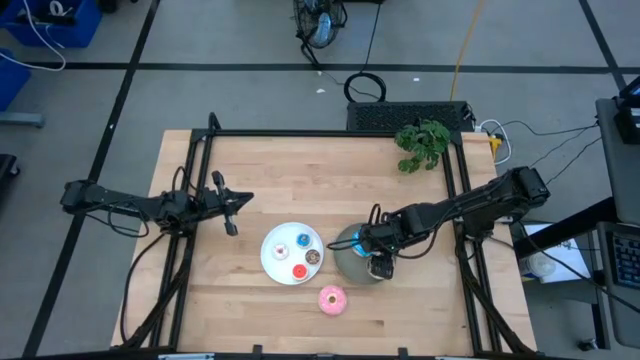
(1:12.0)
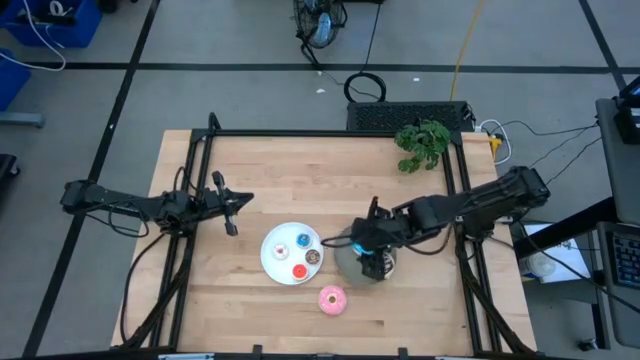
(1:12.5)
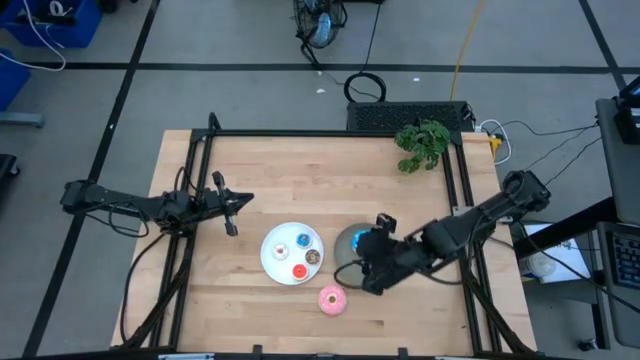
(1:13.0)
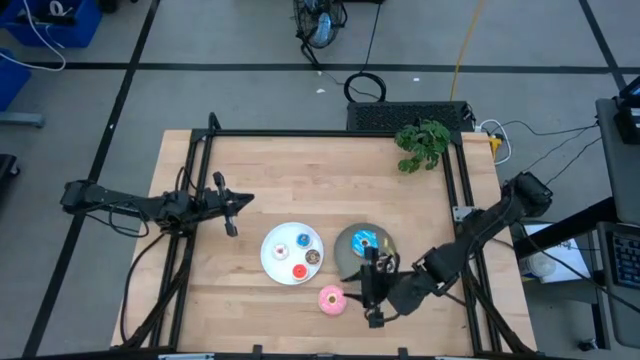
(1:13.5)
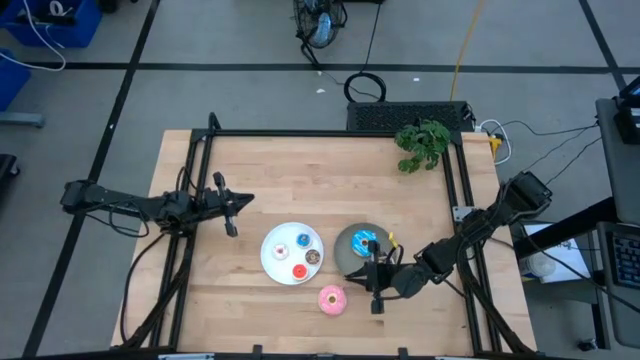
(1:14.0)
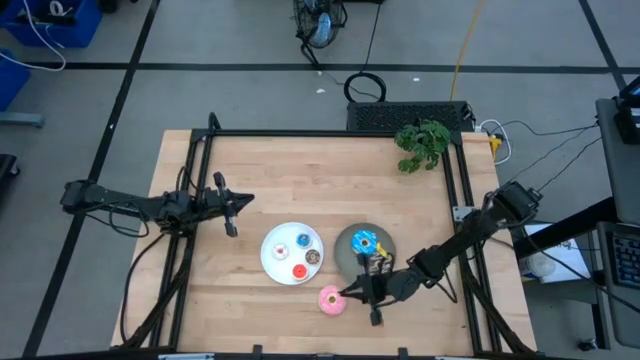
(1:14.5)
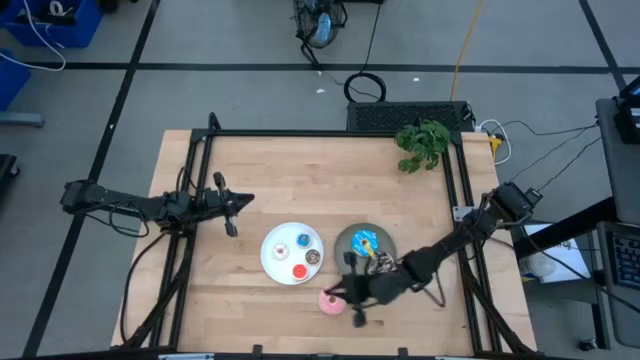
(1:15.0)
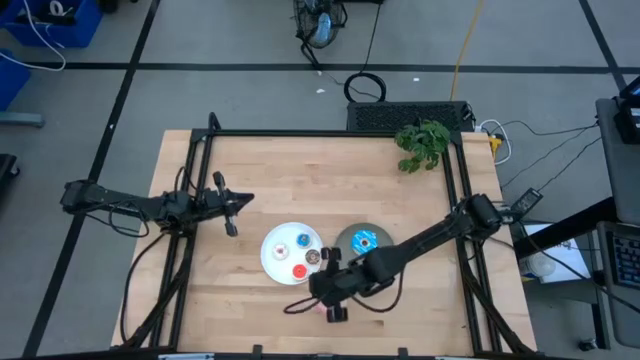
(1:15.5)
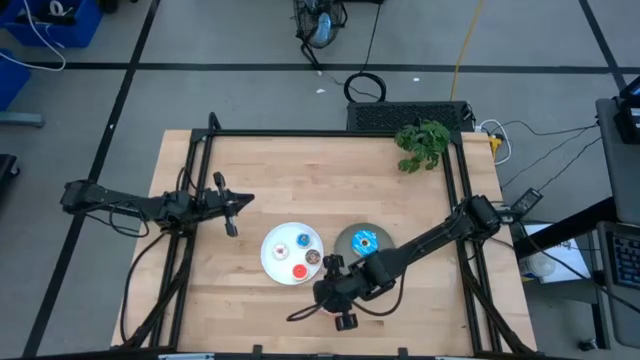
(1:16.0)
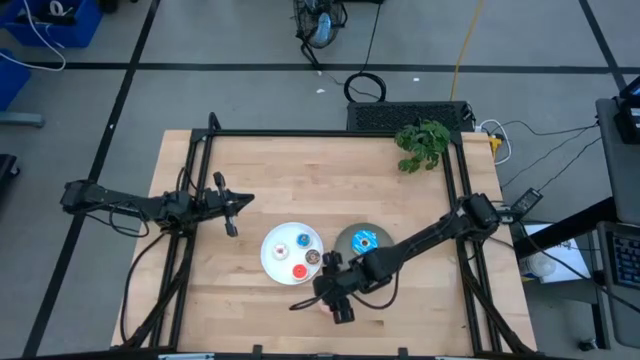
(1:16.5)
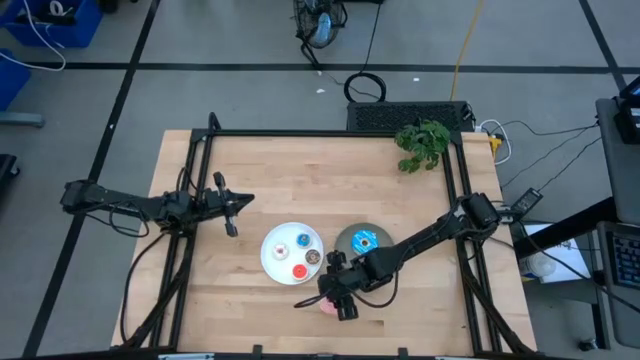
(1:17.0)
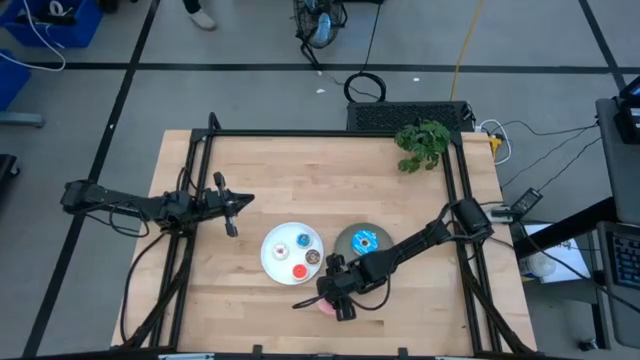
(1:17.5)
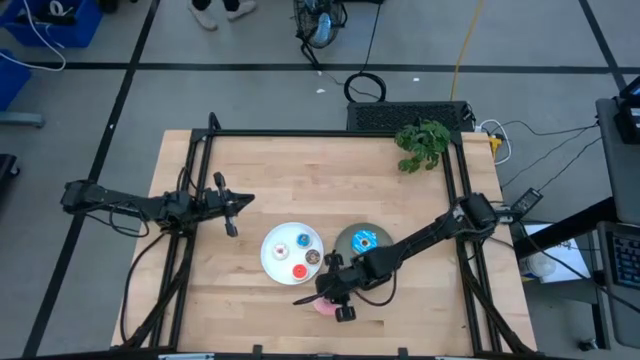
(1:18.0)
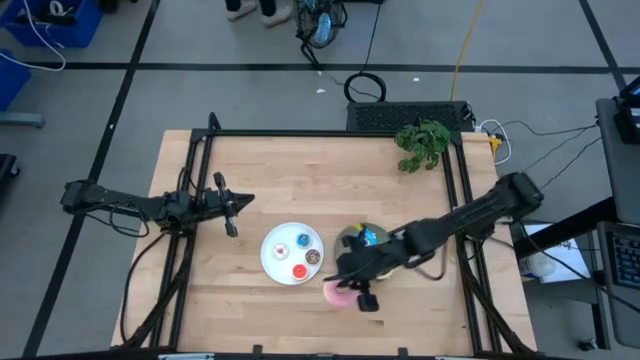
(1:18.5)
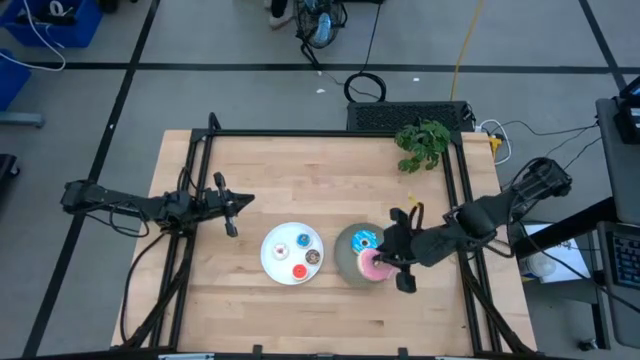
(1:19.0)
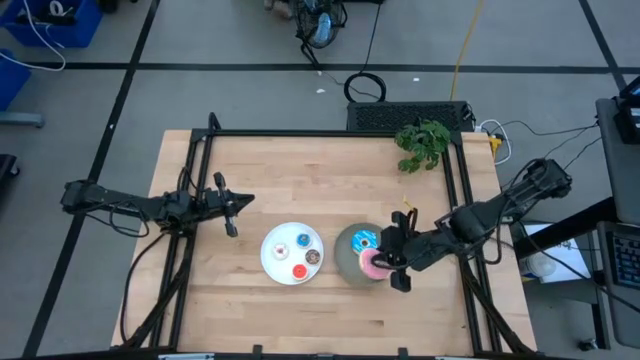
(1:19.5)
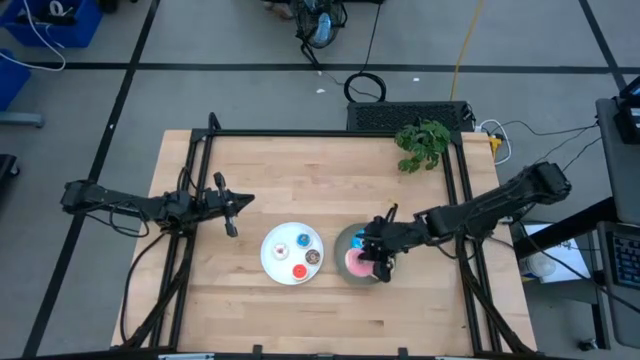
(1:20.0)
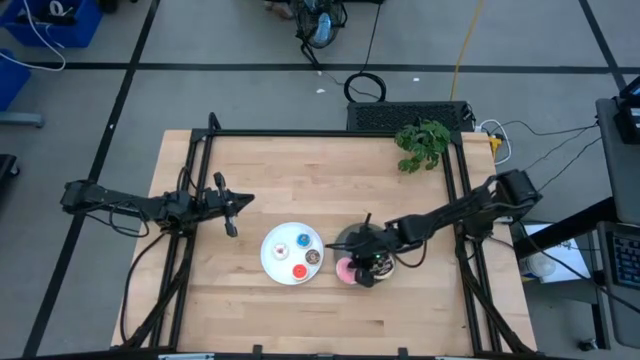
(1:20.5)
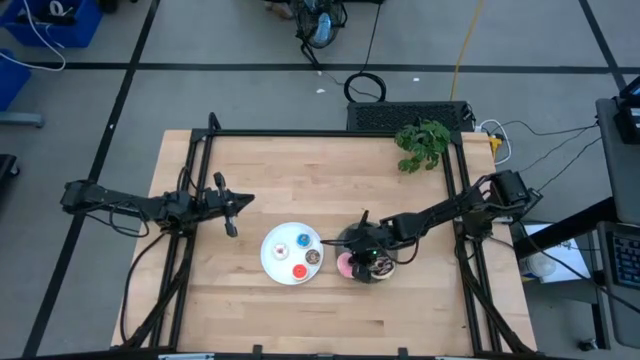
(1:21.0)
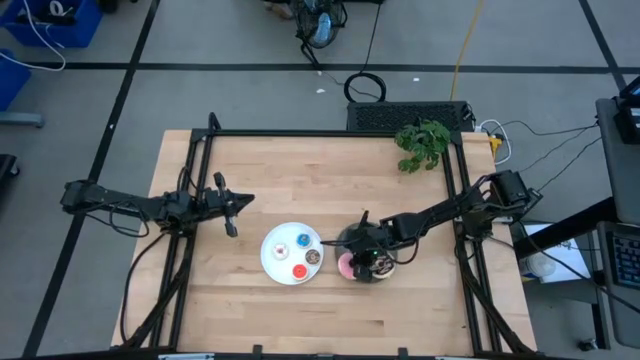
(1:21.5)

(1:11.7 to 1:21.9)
Task: Pick & Place donuts
Put the large pink donut on the green plate

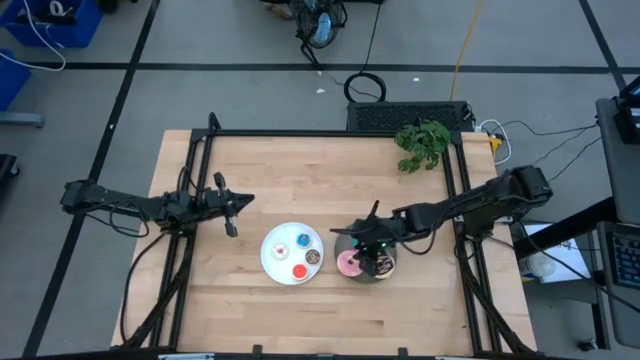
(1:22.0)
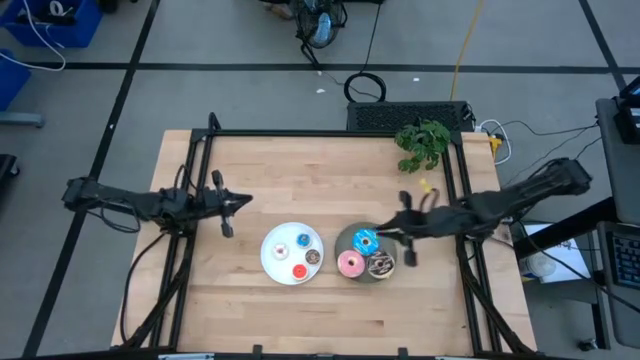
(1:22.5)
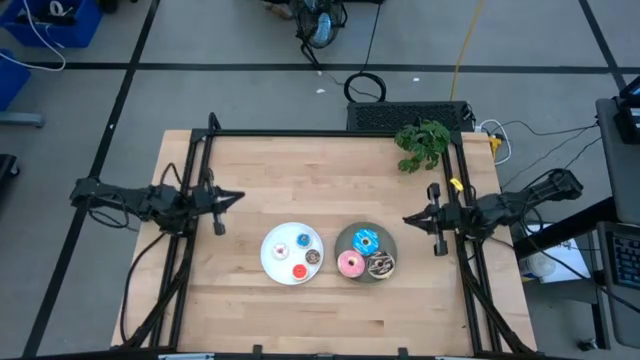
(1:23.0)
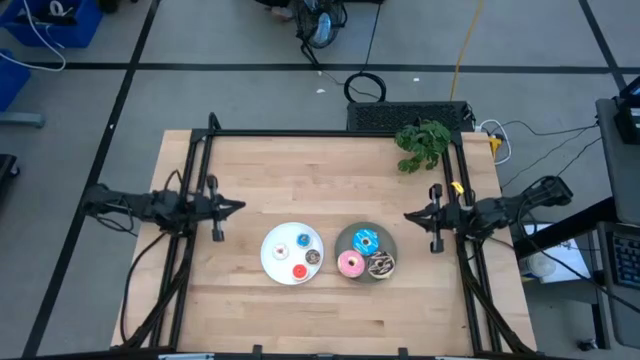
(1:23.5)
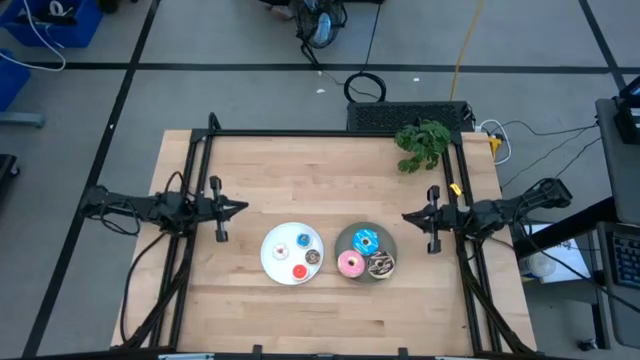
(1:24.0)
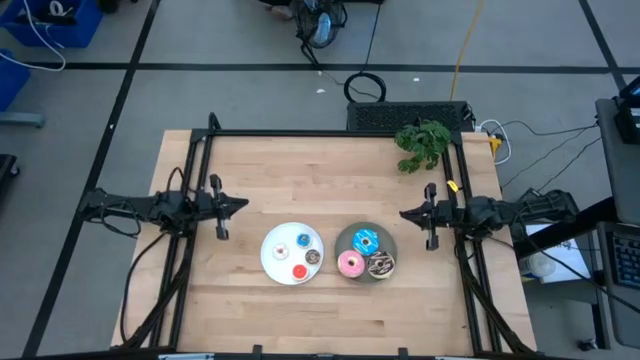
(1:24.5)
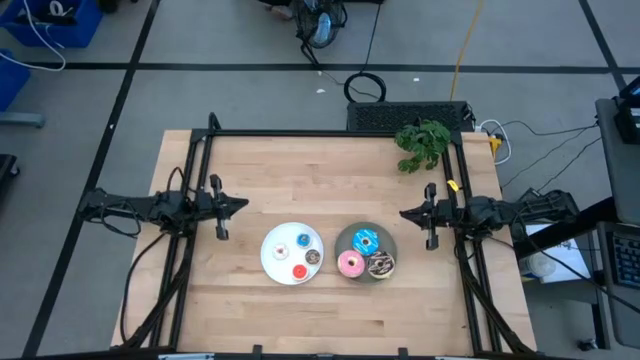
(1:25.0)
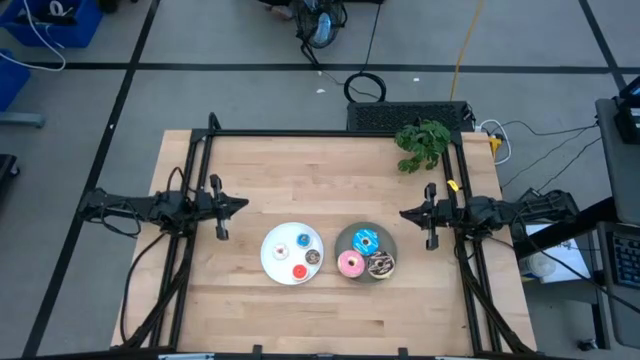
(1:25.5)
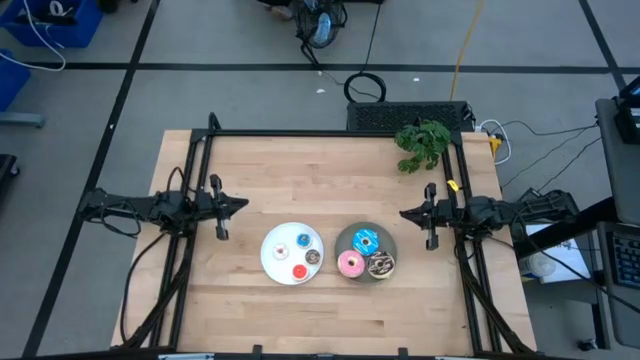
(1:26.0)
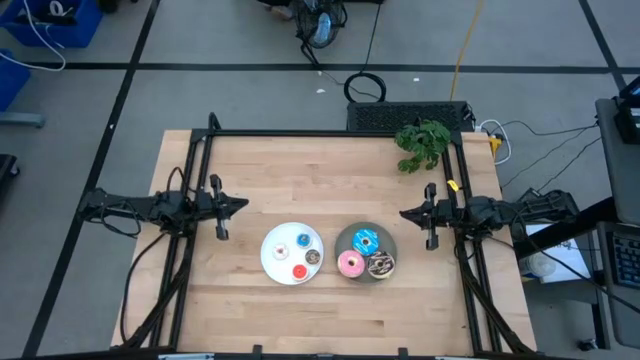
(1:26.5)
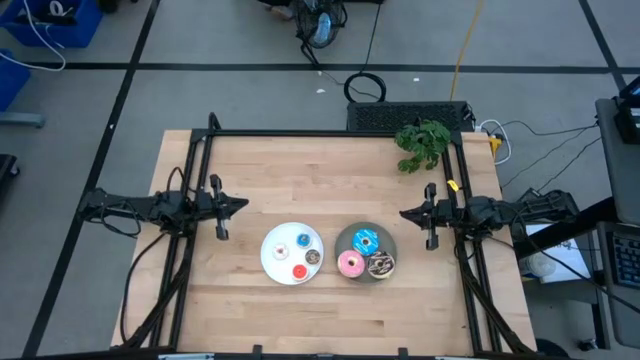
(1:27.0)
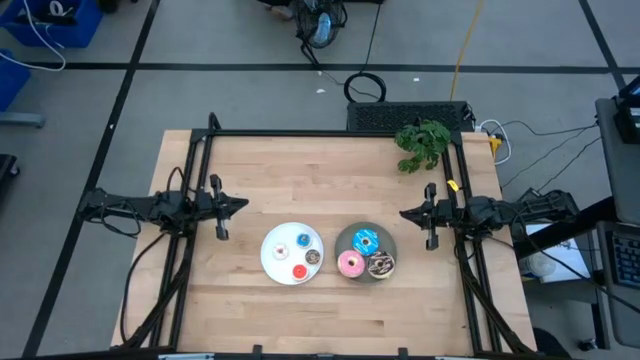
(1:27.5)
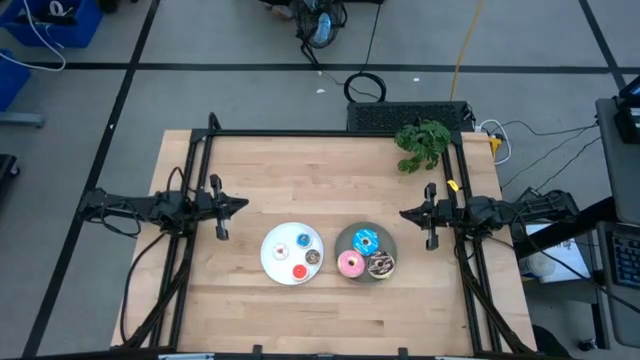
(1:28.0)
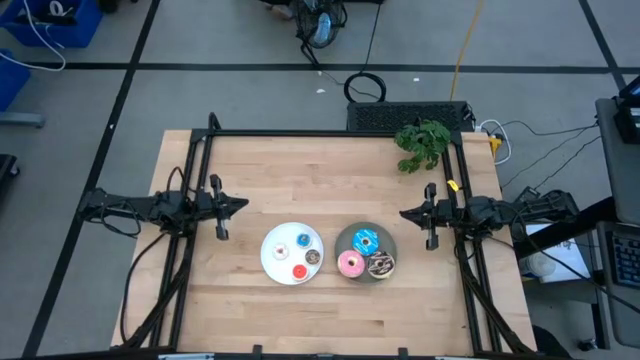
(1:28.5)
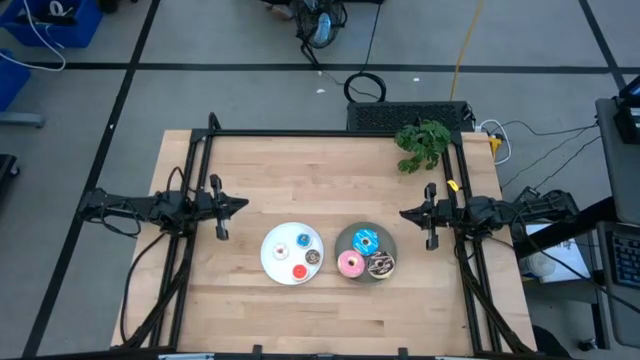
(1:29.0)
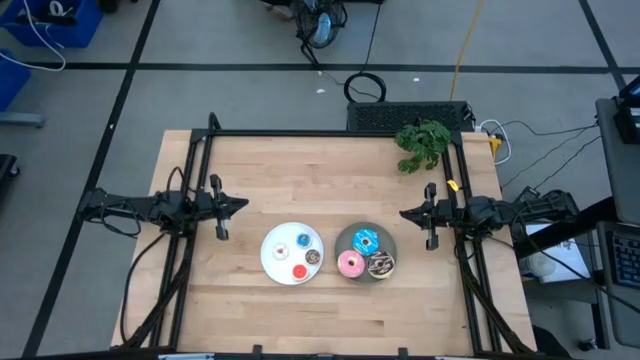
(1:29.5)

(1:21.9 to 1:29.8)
Return to Home Position

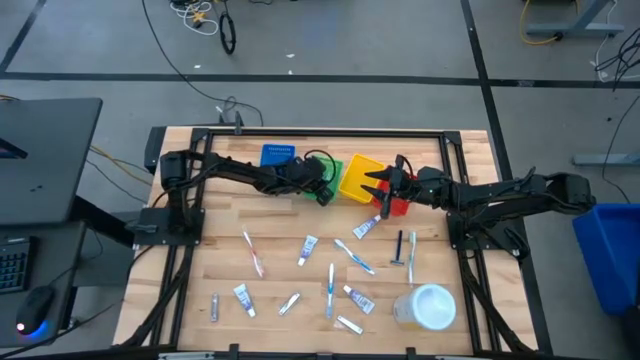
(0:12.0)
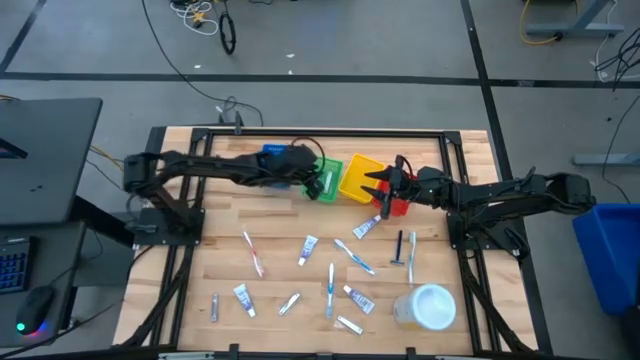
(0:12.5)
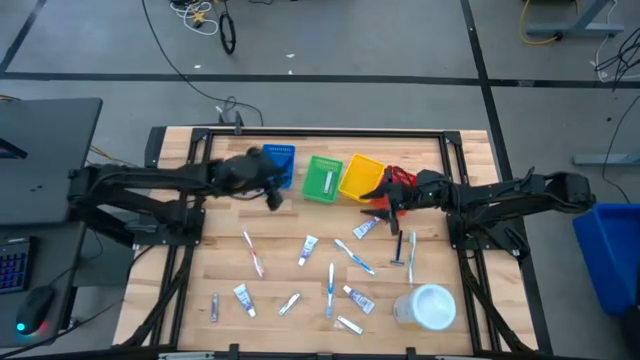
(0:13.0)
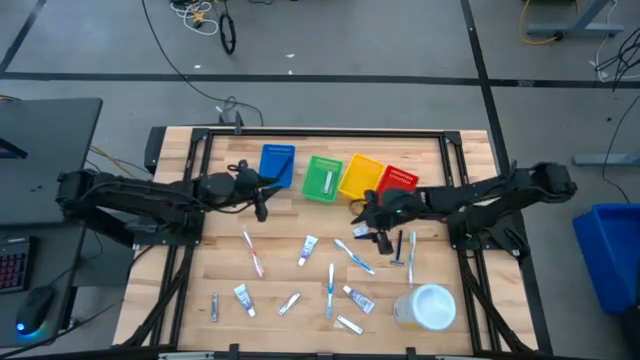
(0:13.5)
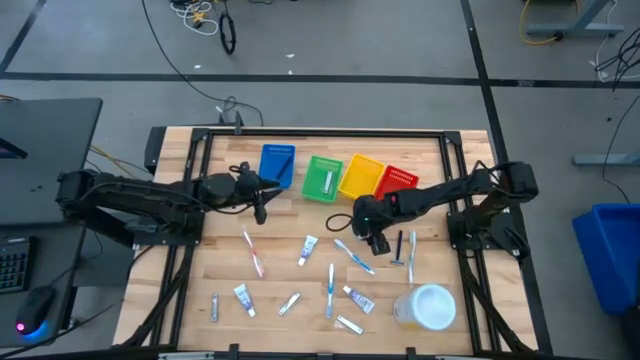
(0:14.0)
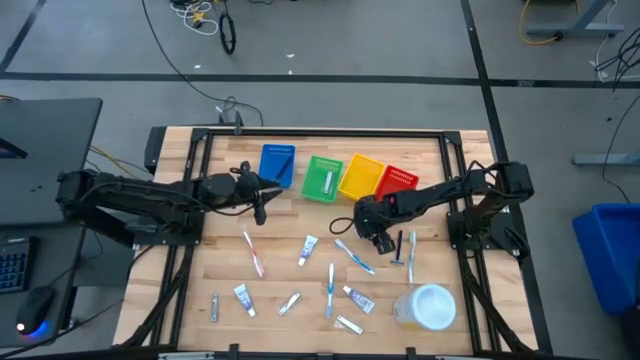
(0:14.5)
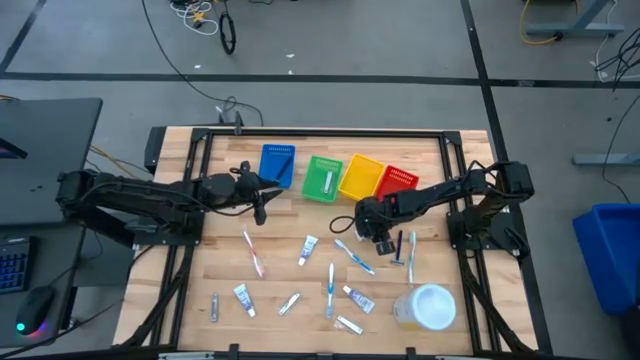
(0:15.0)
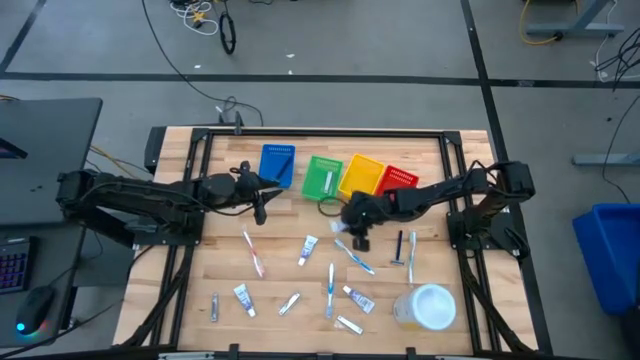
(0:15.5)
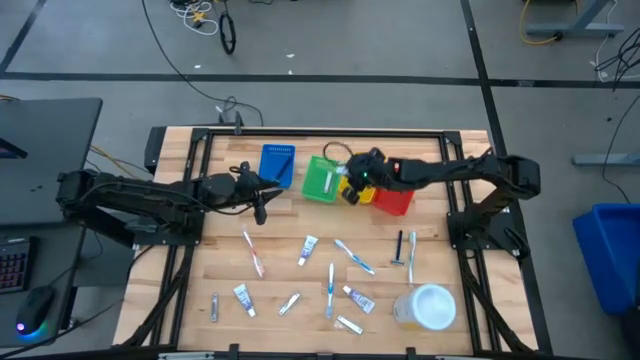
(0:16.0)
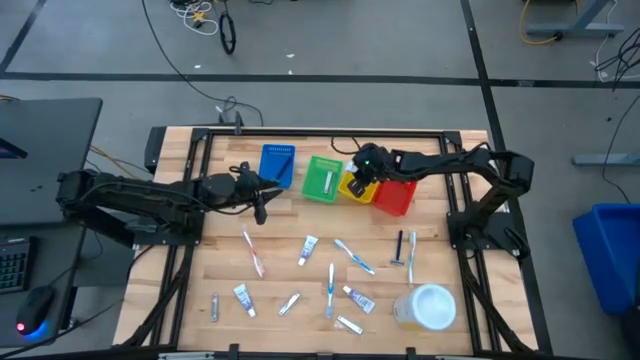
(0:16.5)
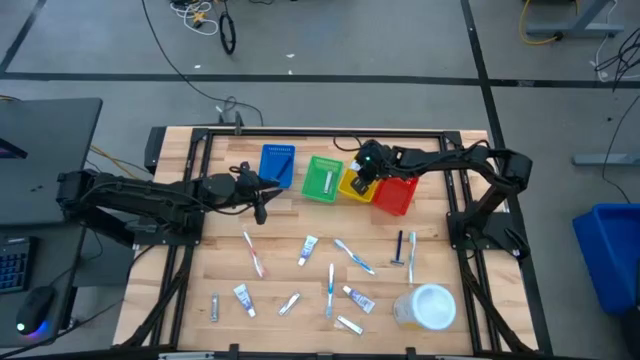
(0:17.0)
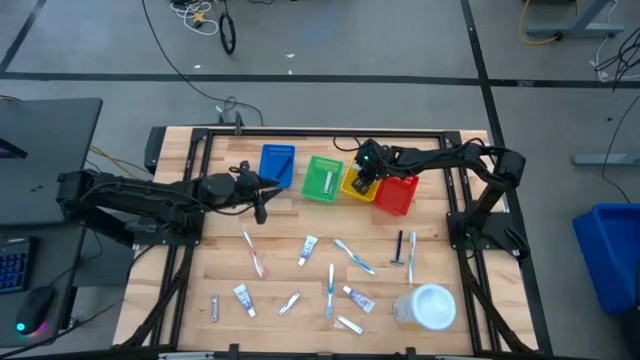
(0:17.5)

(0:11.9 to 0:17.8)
Task: Pick & Place Travel size toiletries
Put the white toothpaste into the yellow bin
